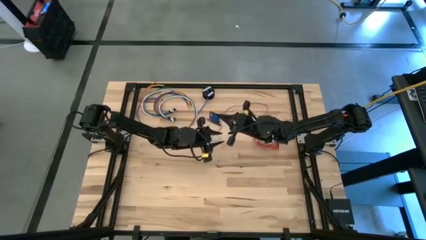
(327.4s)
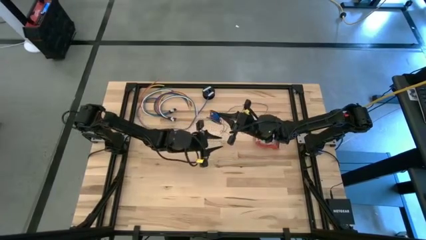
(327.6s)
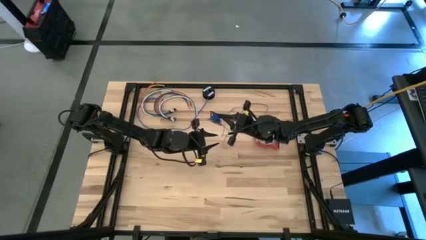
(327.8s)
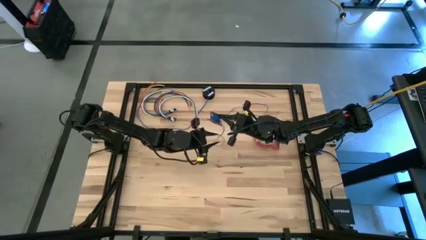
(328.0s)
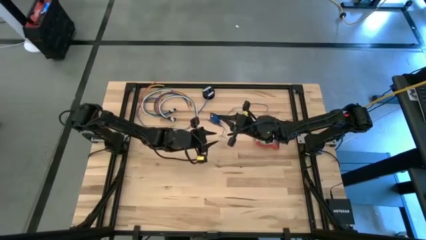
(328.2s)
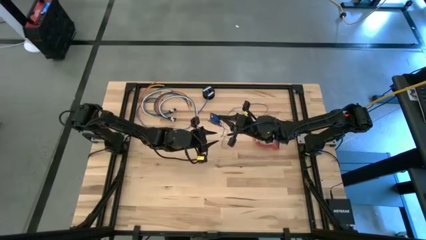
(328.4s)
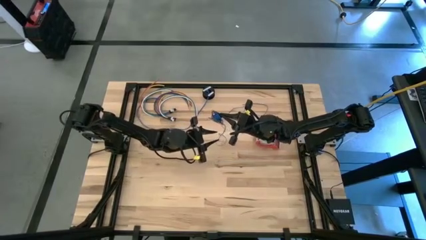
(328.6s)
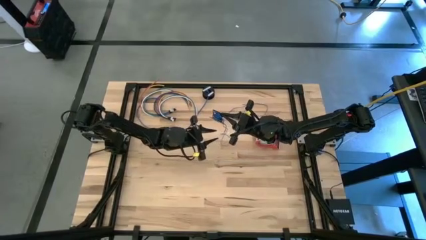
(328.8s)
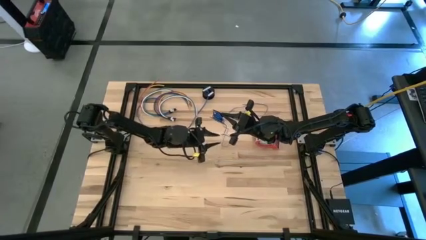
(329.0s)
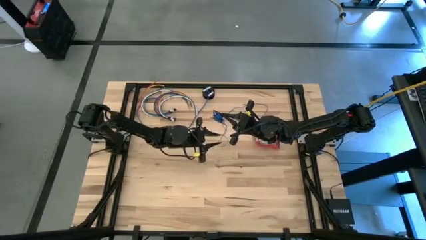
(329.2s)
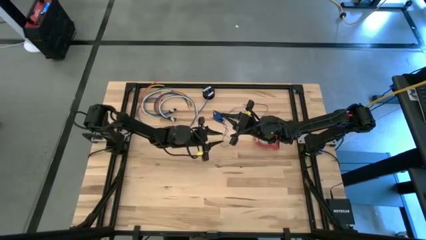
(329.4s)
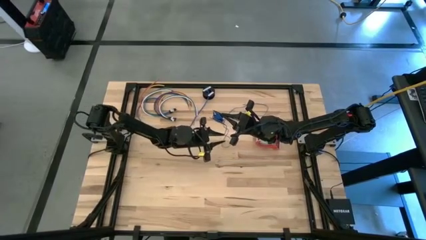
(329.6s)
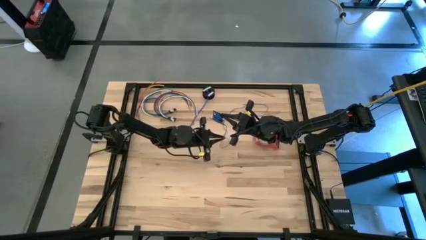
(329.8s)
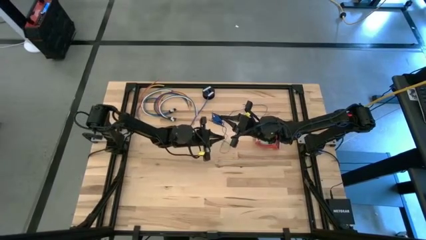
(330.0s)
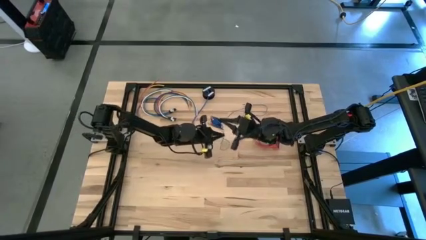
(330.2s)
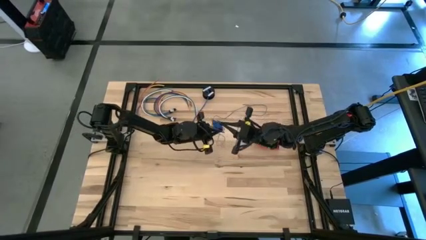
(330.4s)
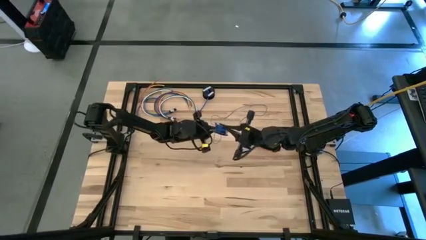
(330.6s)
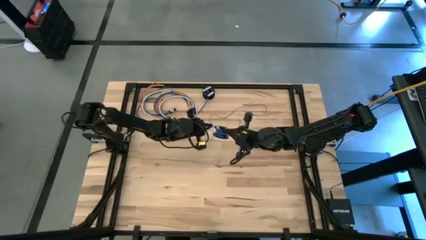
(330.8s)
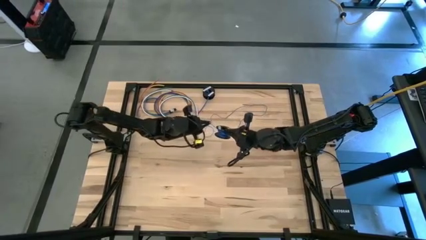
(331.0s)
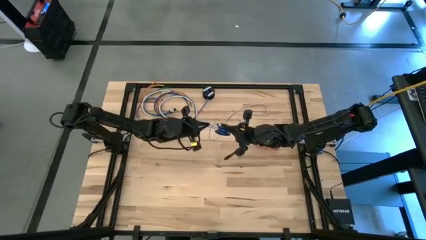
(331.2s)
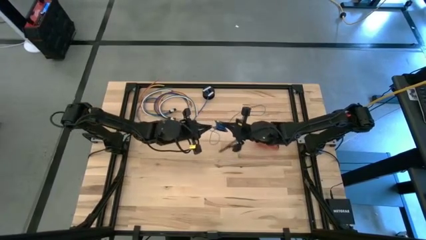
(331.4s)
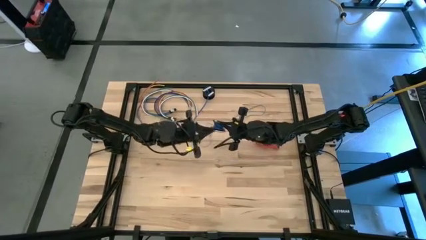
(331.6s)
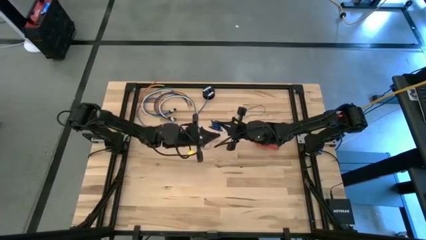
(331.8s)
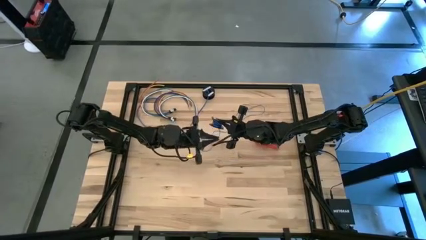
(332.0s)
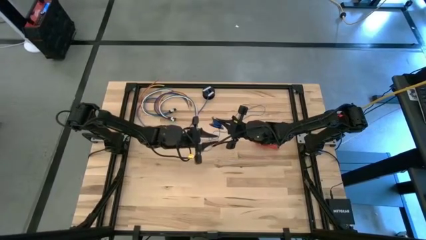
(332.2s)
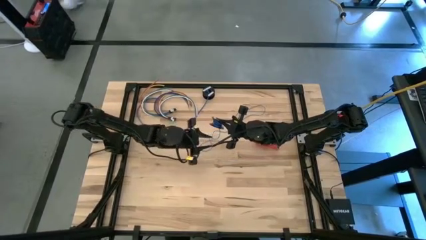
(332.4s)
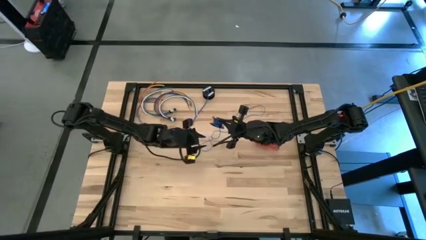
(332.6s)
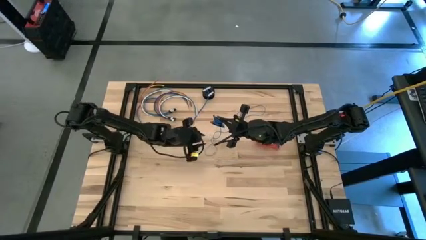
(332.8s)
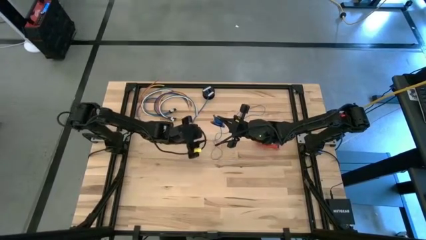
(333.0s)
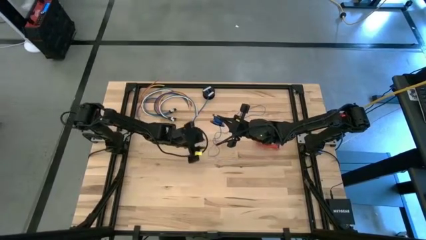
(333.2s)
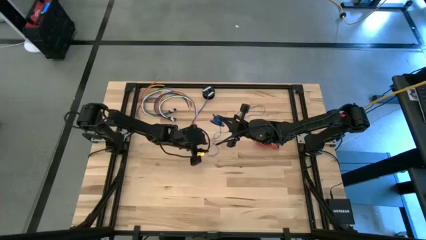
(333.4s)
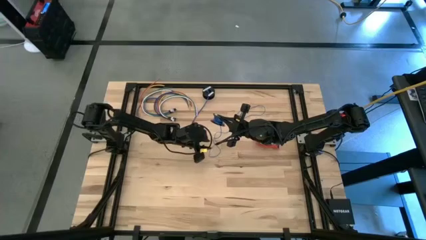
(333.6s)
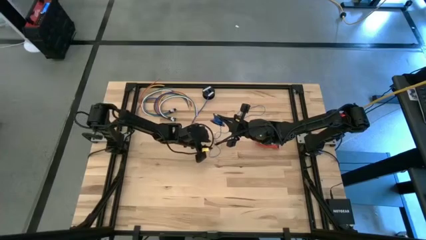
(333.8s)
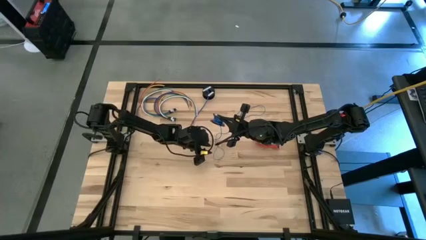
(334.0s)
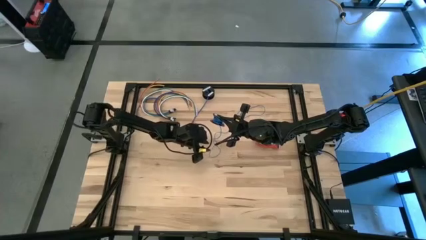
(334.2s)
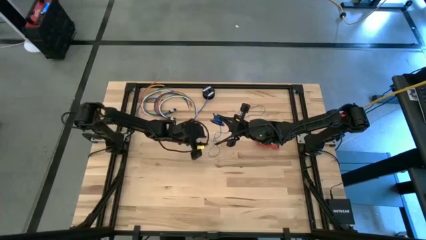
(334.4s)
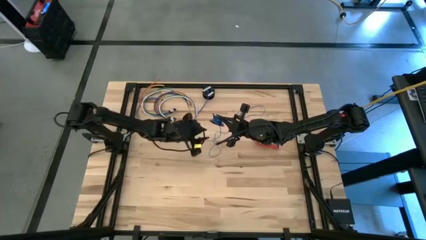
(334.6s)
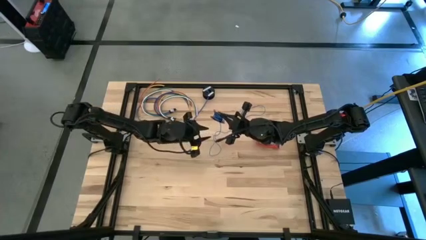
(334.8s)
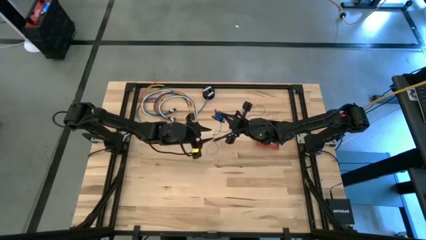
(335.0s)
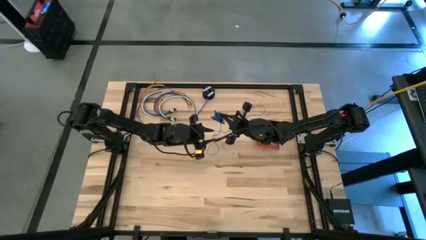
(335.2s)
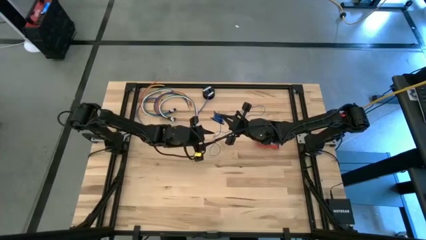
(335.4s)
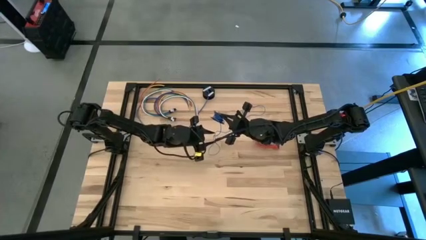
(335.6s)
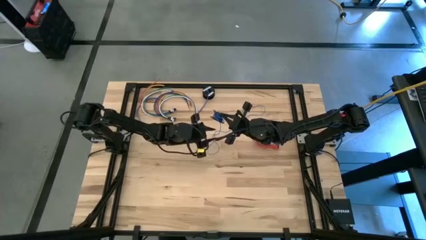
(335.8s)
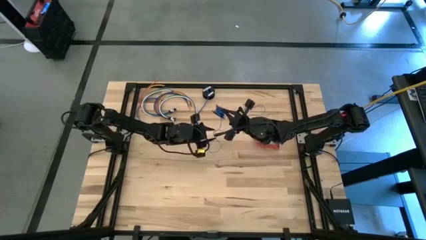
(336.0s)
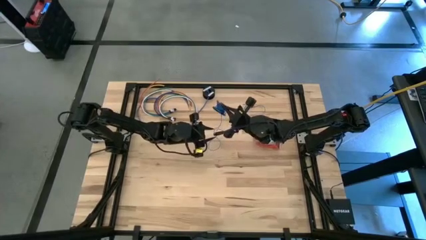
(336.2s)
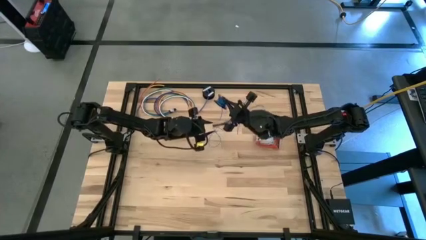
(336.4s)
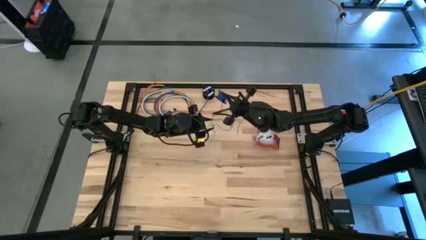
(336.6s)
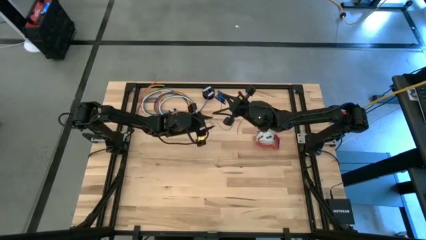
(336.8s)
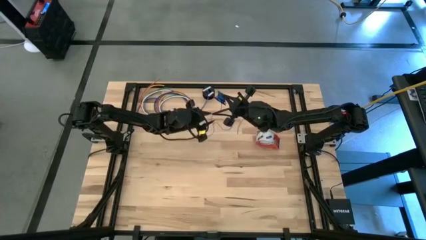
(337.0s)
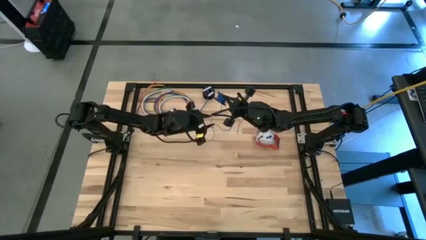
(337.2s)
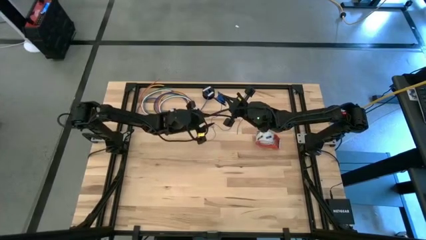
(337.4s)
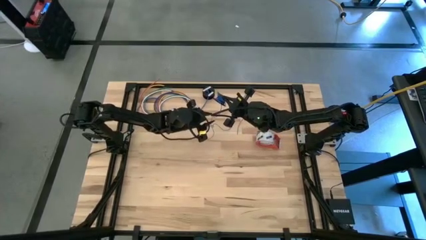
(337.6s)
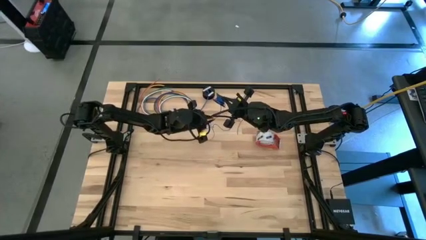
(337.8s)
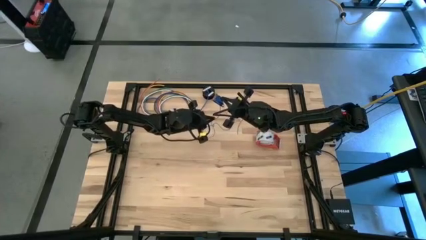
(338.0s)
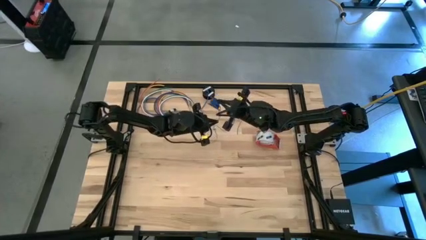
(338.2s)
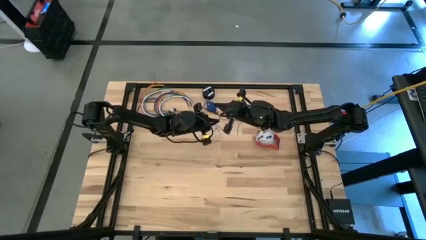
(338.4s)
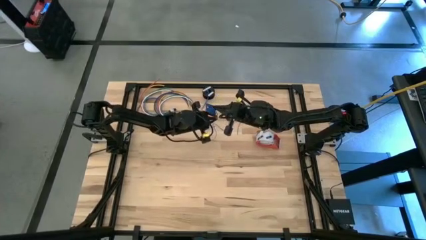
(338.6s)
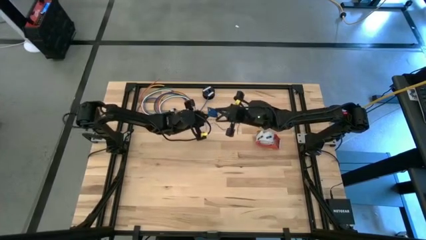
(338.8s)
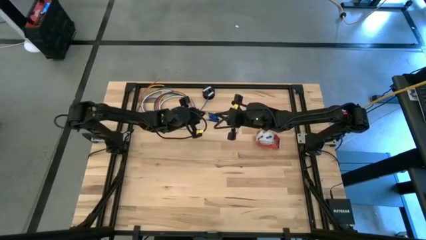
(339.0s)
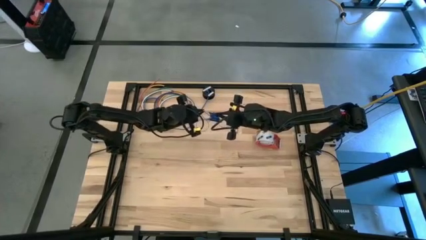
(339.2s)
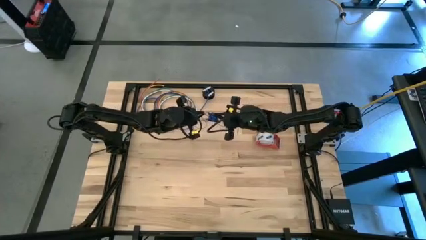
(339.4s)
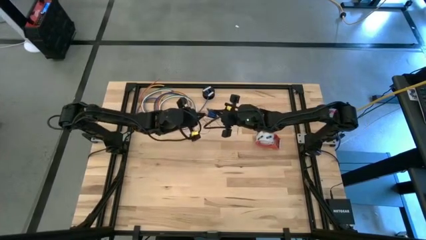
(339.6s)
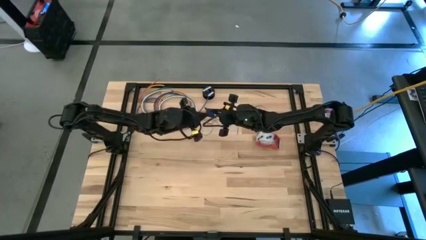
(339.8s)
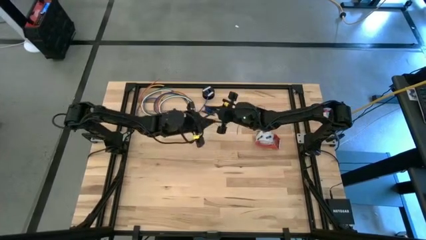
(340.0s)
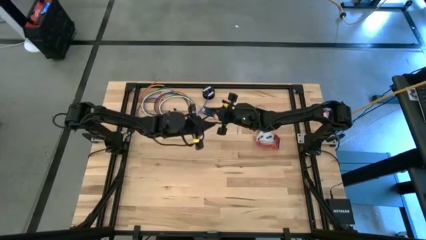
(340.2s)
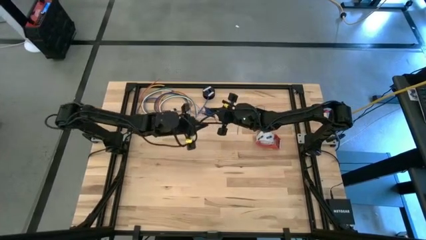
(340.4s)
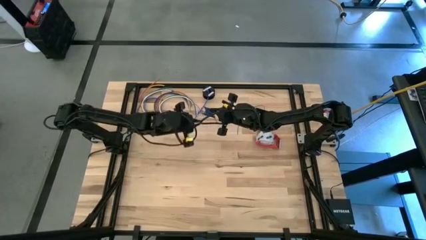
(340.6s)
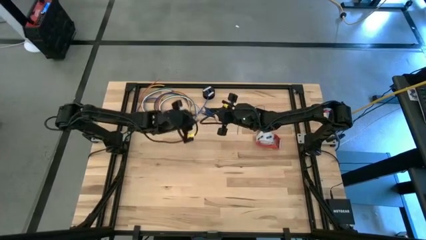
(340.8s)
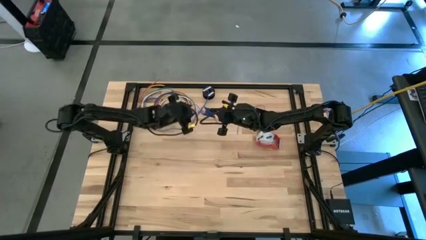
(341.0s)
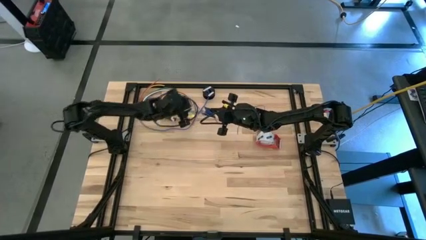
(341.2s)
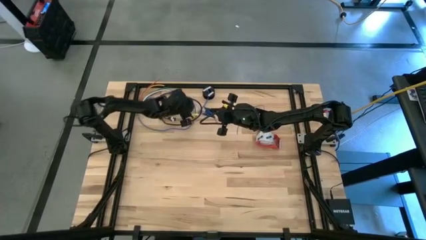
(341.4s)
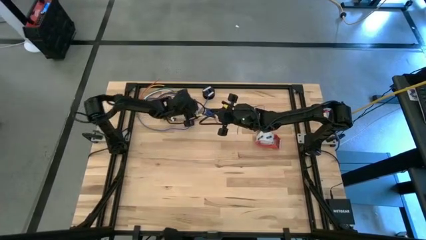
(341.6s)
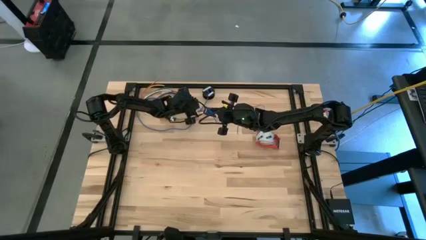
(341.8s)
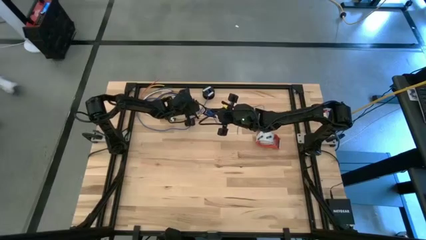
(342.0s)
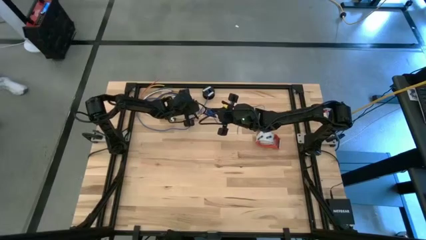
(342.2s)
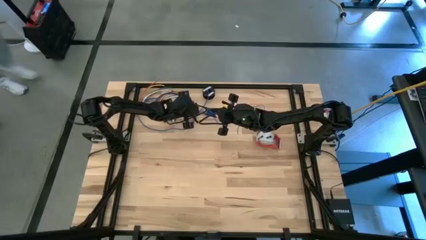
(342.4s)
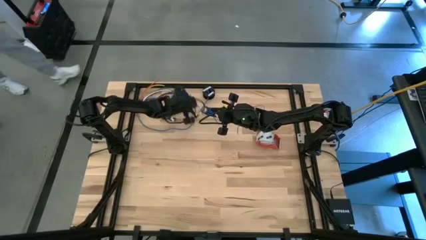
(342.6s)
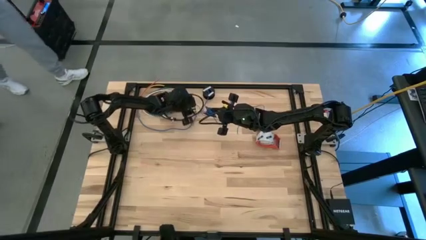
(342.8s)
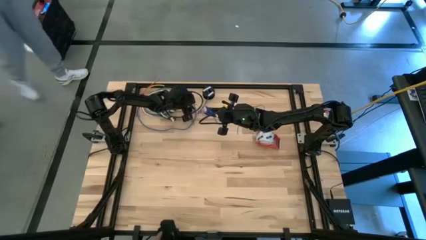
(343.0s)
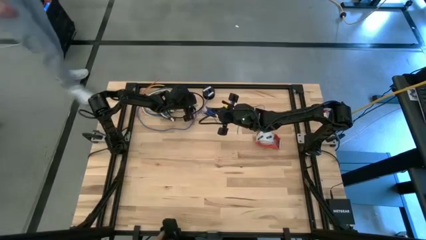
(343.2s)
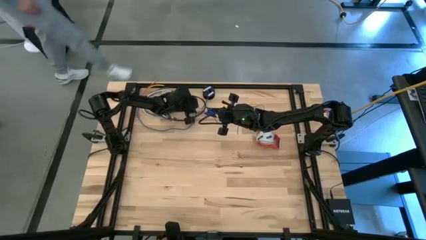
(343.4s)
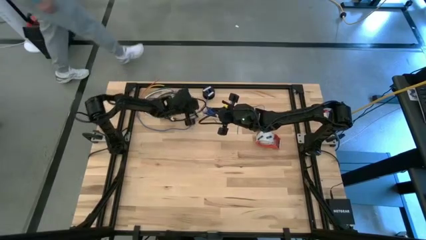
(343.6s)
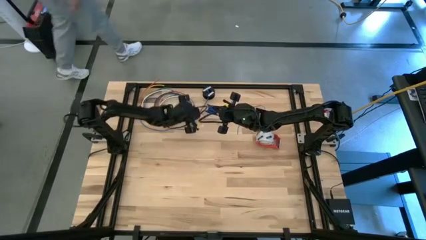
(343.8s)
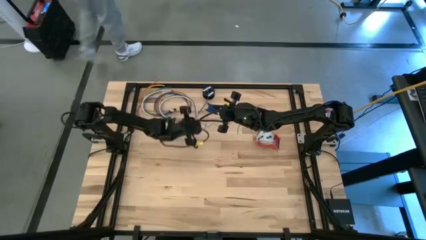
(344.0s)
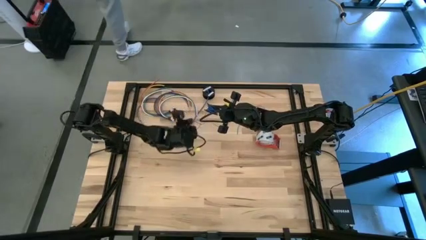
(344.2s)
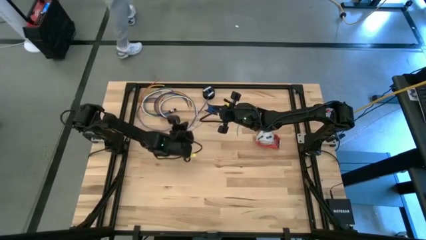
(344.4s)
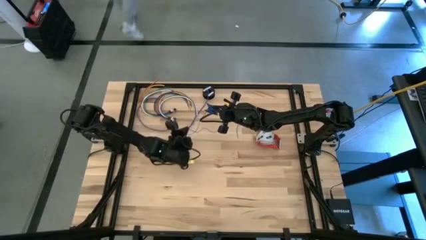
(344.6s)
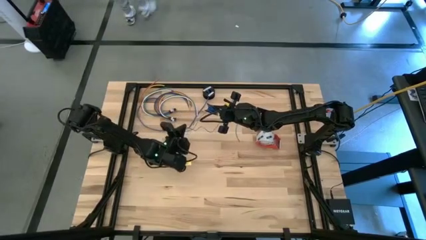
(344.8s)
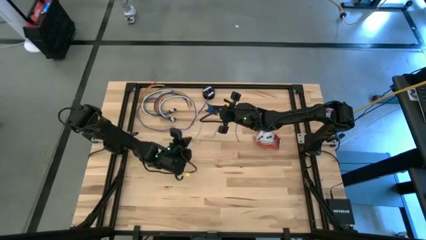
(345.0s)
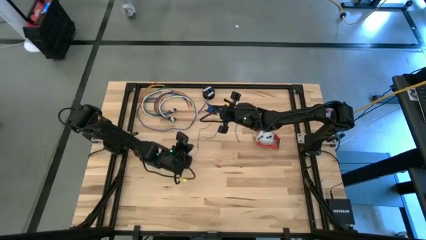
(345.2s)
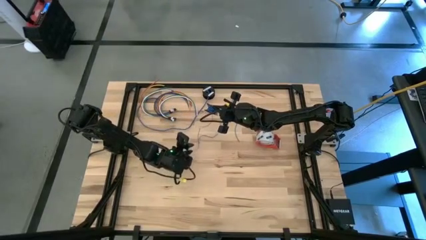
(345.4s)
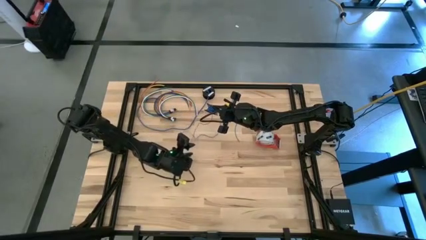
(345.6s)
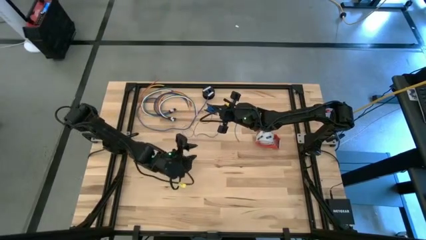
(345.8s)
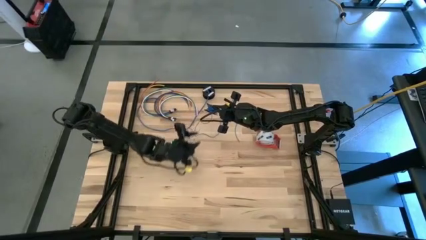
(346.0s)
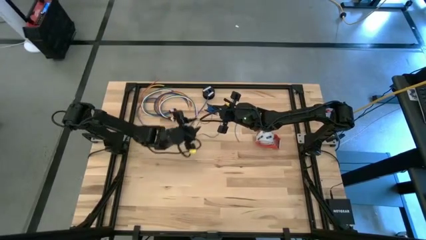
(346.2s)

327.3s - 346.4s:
Task: Coil cords
Coil the blue wire onto the spool
